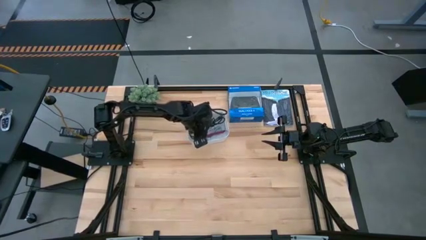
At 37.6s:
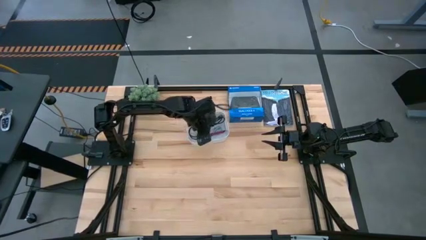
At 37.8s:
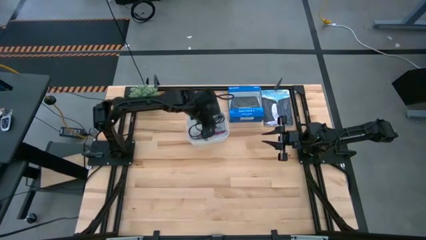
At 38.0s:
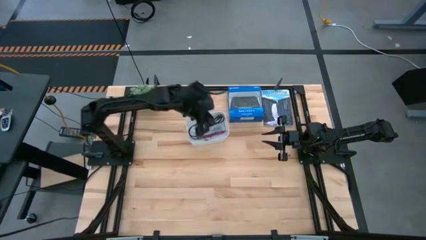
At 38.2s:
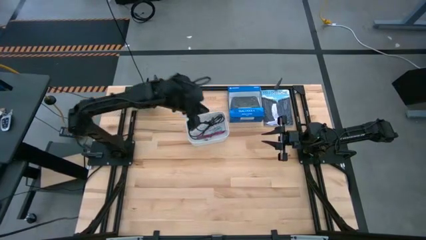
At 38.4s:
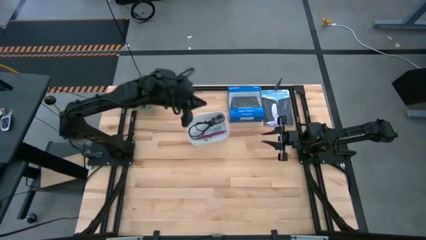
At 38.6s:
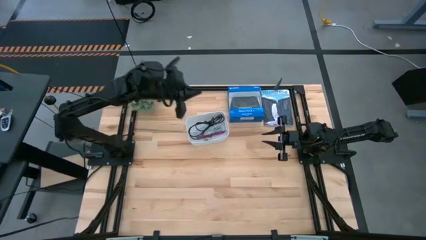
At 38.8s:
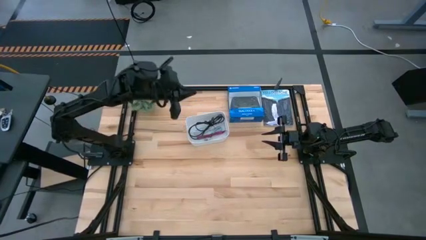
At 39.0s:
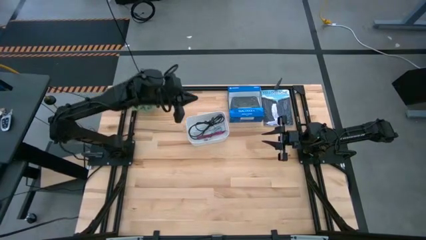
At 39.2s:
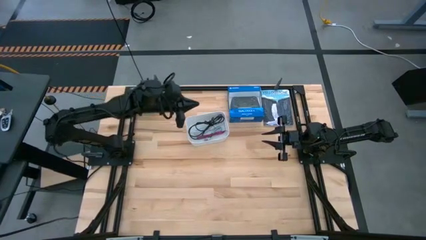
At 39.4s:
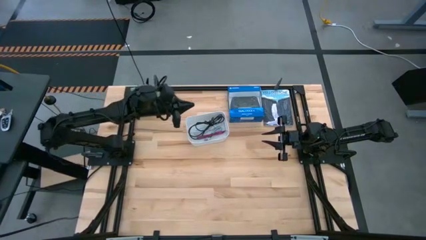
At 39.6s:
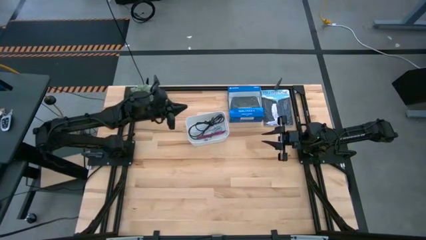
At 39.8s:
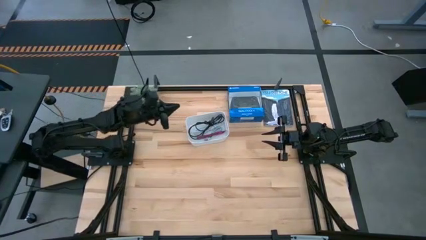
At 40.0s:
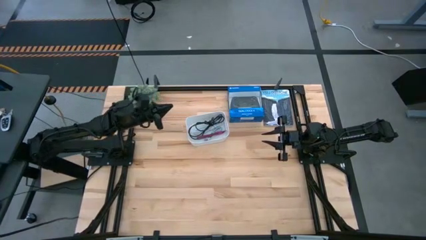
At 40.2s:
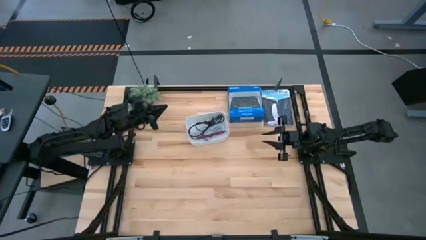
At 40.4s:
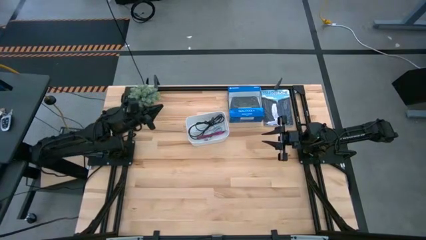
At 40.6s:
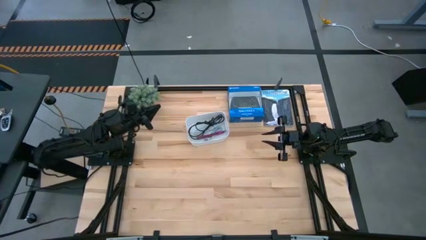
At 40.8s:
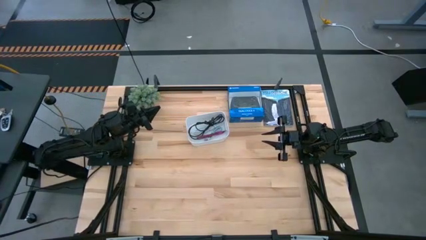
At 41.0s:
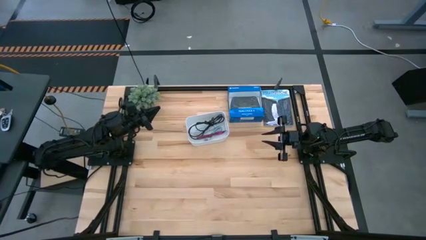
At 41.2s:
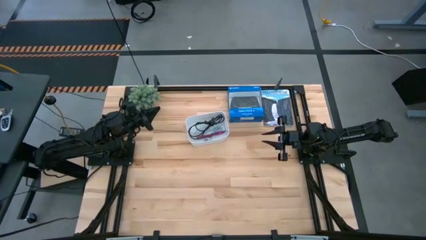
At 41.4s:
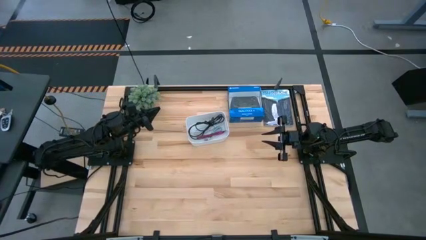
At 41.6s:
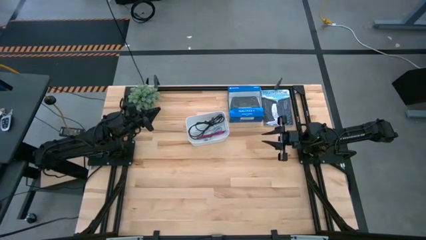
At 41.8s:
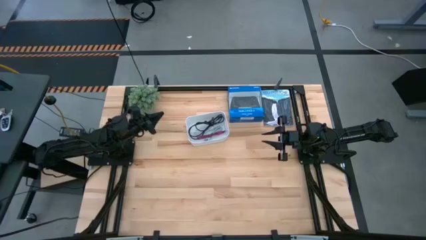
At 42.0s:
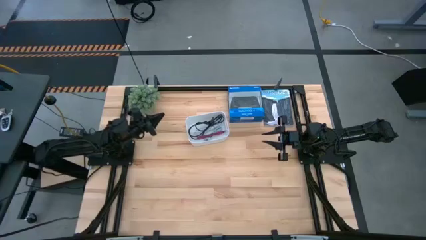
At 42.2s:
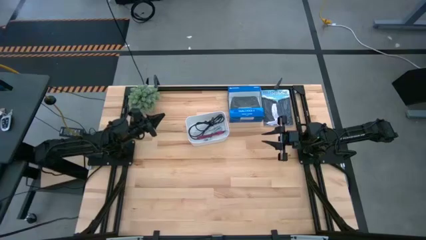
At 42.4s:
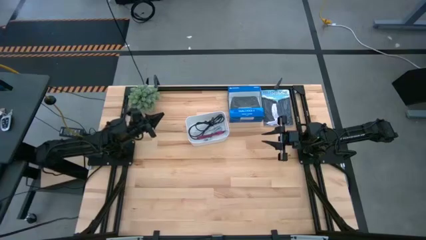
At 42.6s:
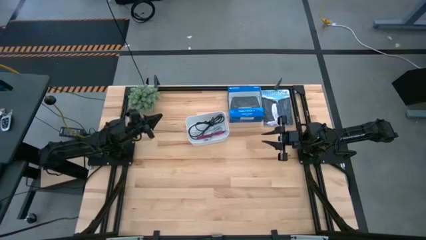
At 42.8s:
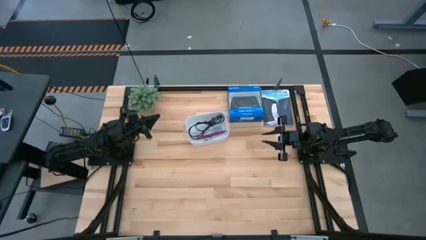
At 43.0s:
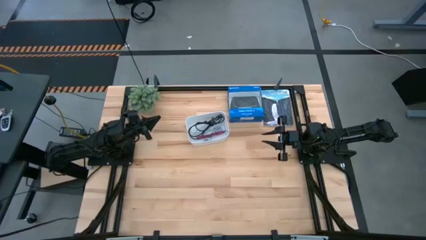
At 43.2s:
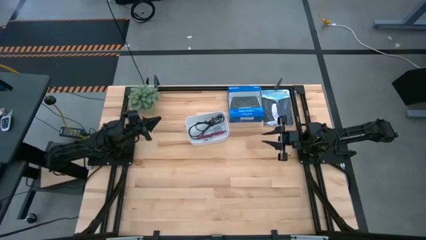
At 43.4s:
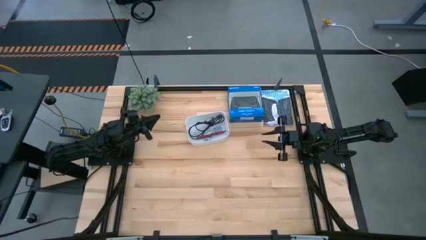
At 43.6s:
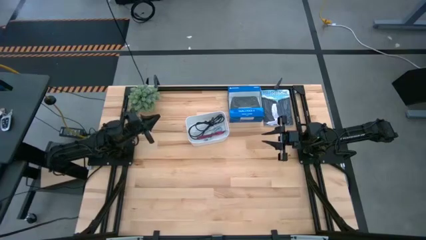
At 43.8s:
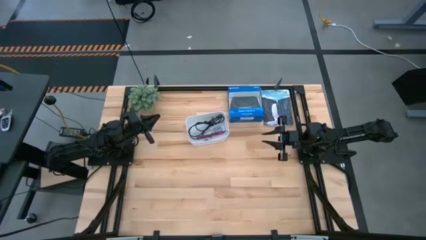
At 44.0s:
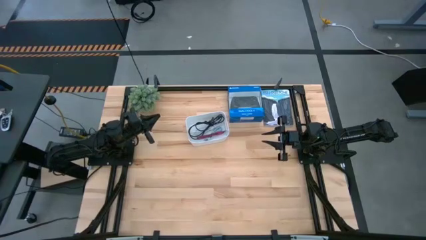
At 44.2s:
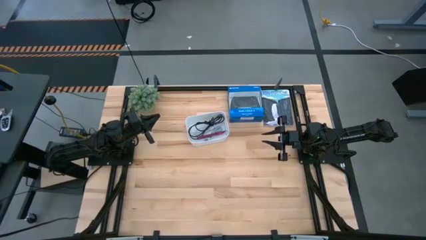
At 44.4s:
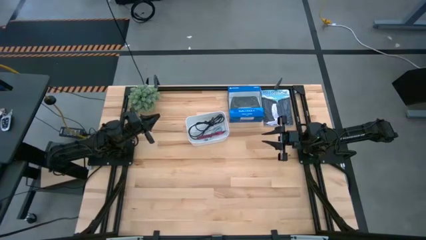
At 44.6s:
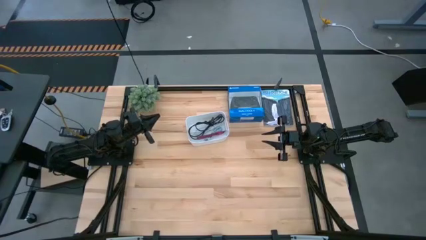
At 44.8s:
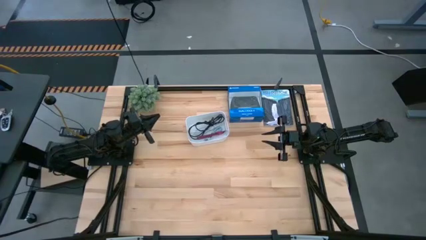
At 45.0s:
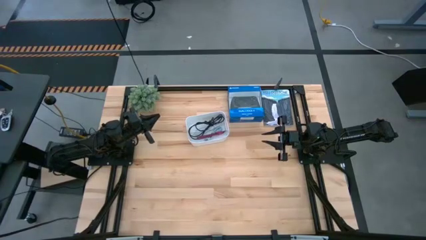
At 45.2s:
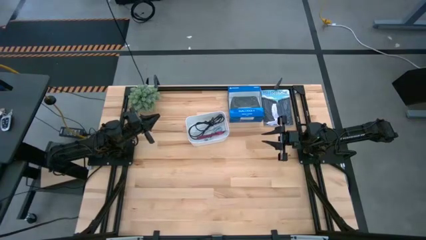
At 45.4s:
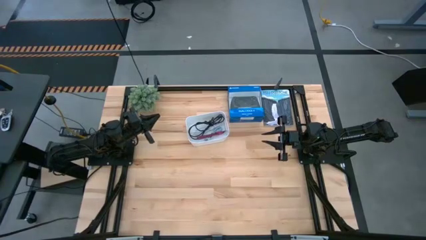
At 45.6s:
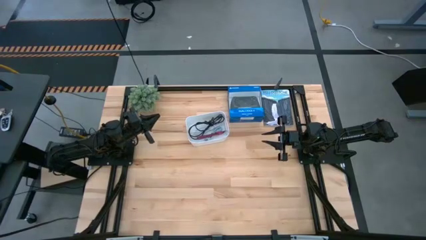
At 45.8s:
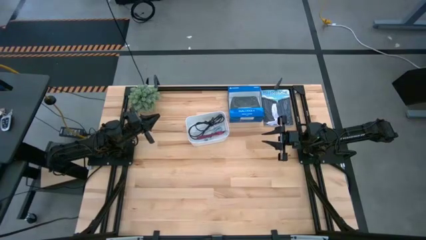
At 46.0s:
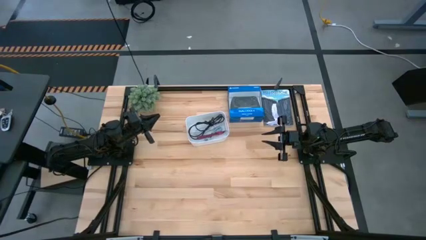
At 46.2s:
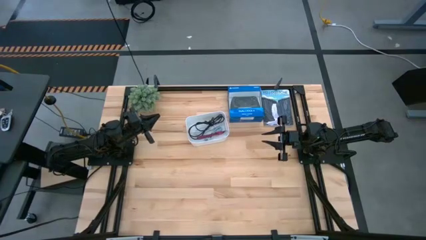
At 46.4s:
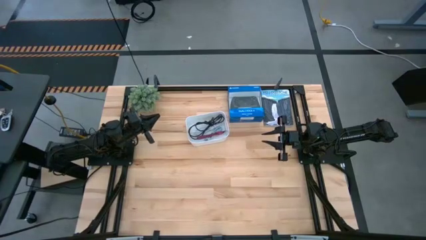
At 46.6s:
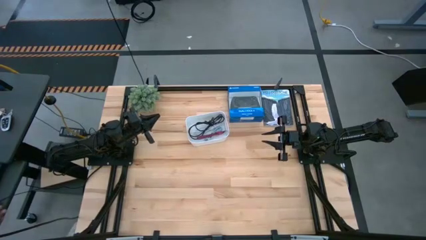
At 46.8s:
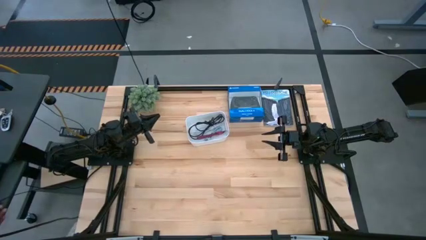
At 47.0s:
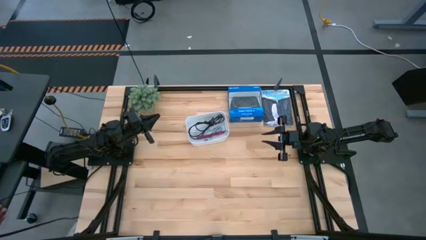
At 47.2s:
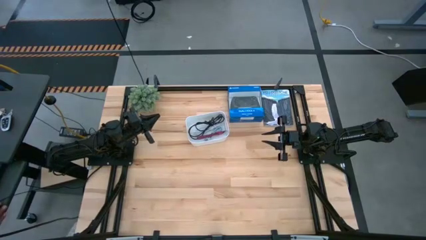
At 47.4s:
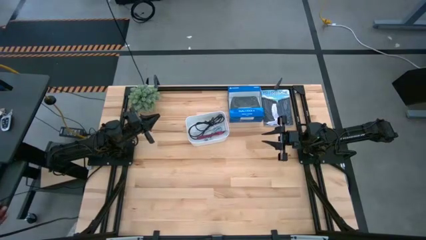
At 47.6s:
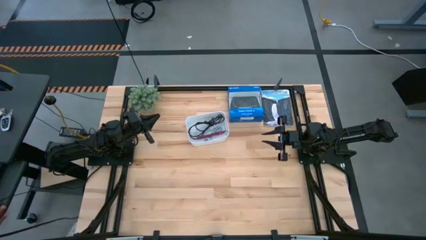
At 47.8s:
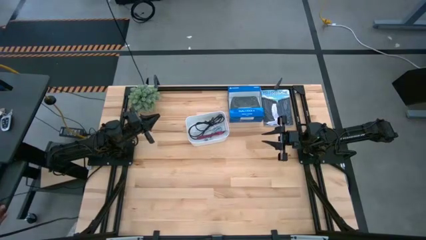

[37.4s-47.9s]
Task: Pick and place USB-C Cables
Return to Home Position
